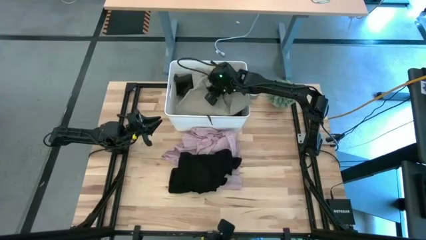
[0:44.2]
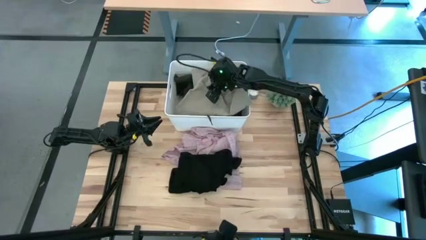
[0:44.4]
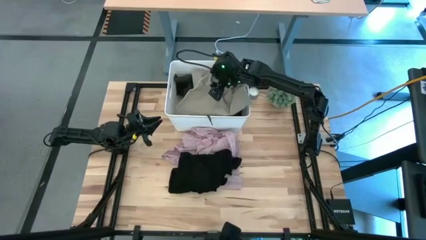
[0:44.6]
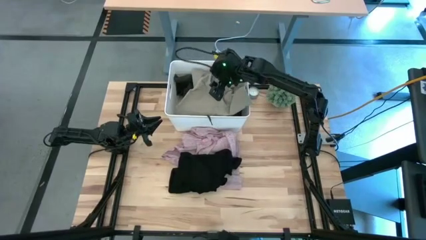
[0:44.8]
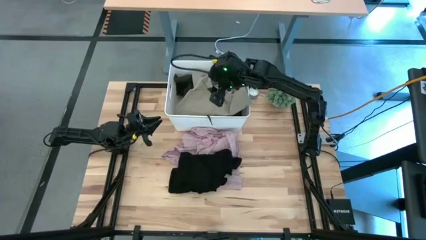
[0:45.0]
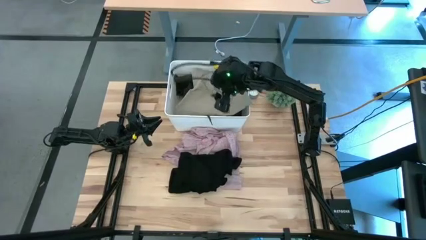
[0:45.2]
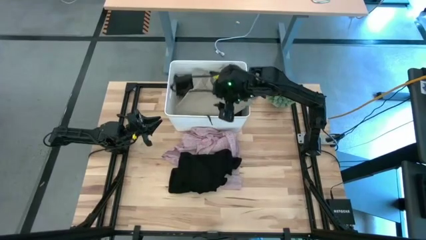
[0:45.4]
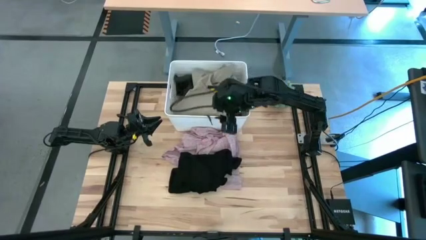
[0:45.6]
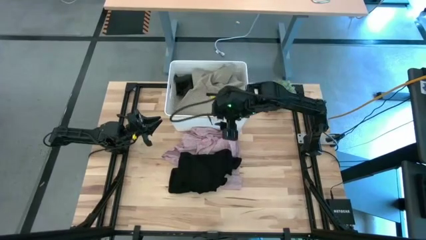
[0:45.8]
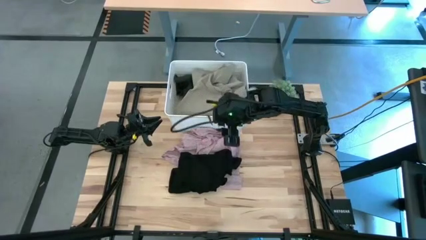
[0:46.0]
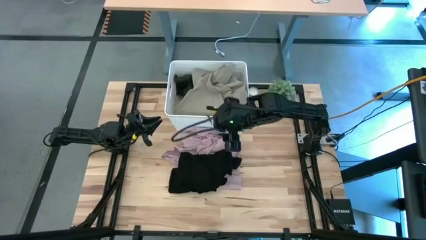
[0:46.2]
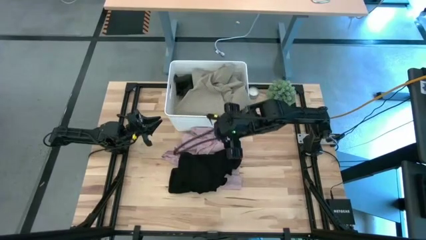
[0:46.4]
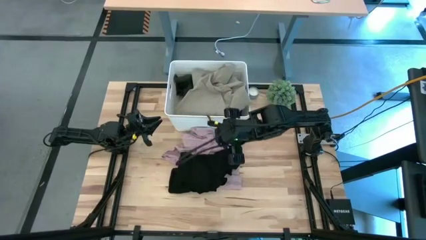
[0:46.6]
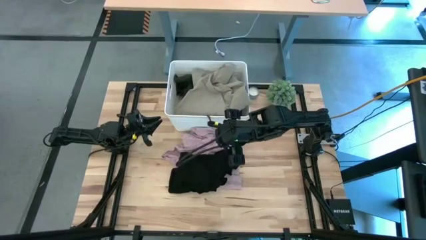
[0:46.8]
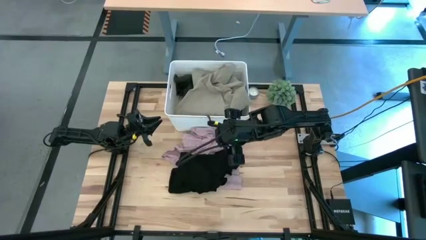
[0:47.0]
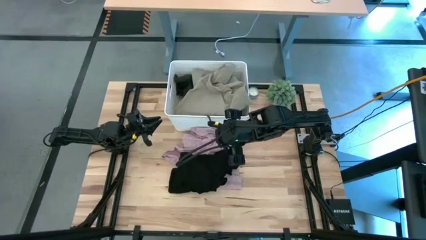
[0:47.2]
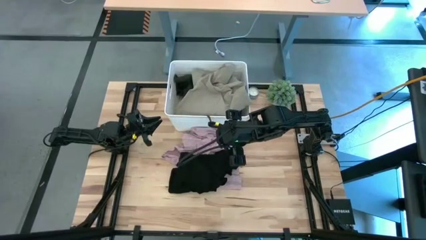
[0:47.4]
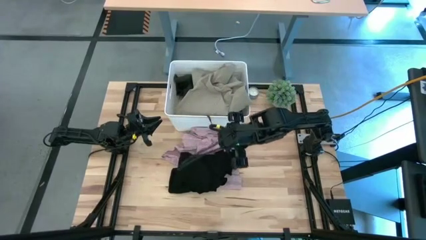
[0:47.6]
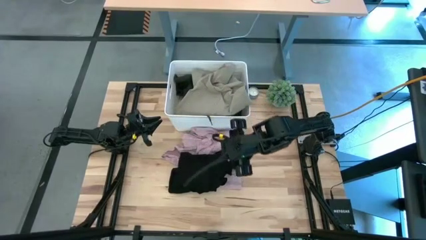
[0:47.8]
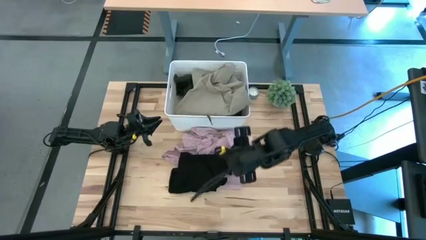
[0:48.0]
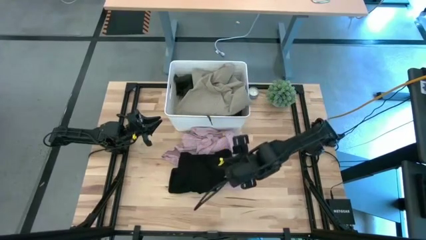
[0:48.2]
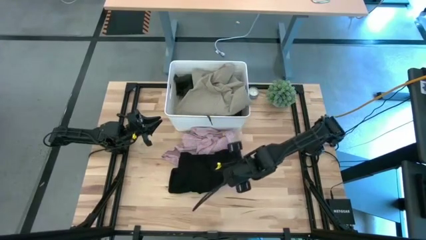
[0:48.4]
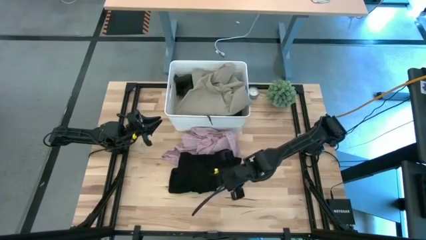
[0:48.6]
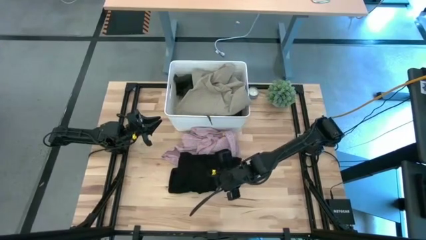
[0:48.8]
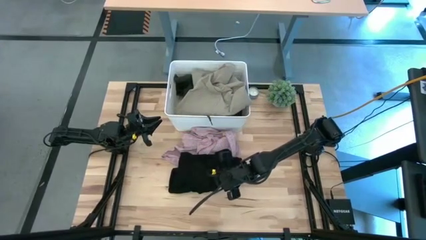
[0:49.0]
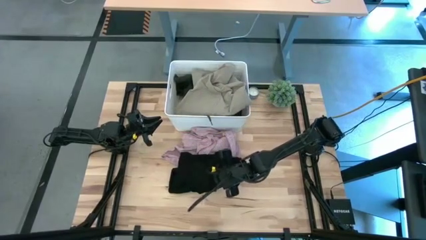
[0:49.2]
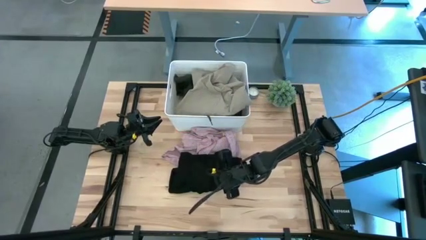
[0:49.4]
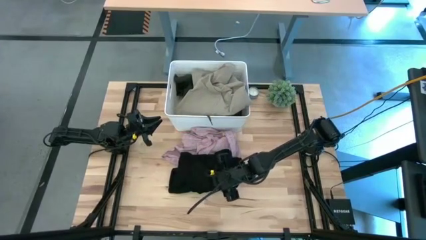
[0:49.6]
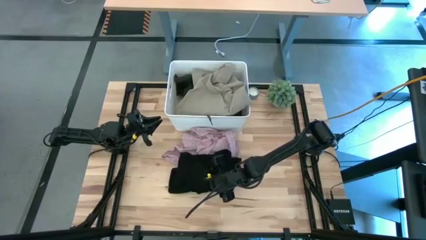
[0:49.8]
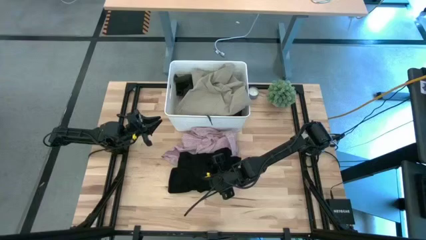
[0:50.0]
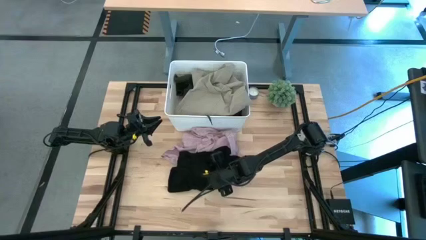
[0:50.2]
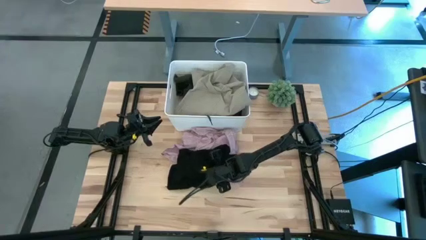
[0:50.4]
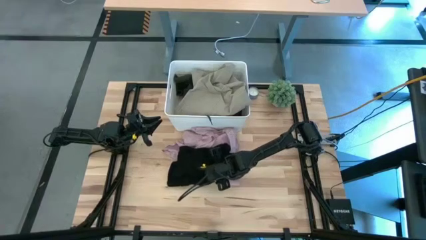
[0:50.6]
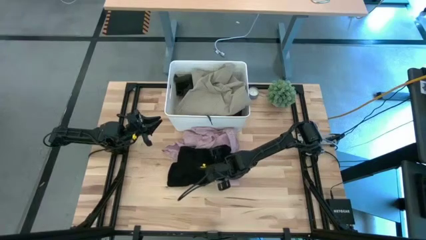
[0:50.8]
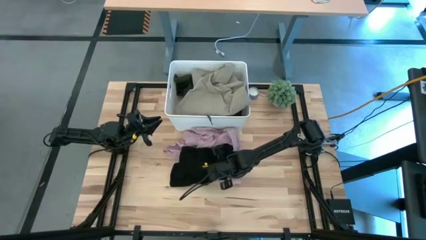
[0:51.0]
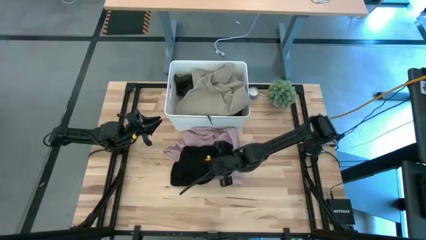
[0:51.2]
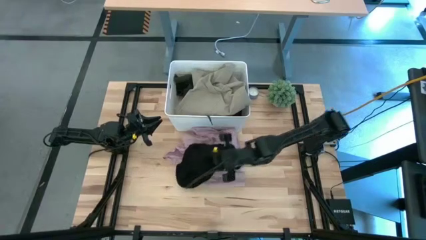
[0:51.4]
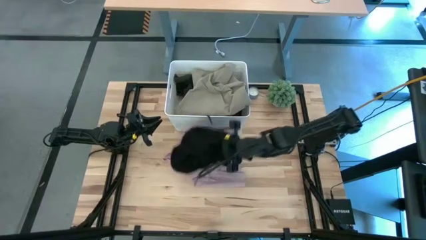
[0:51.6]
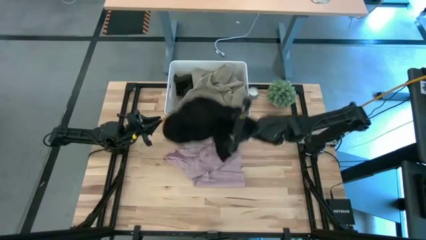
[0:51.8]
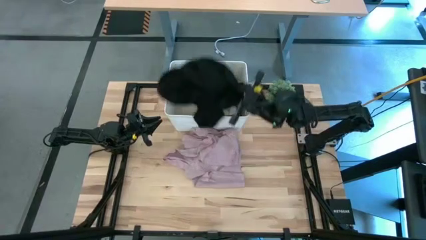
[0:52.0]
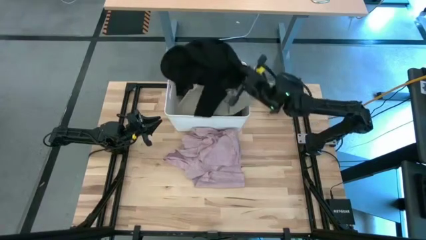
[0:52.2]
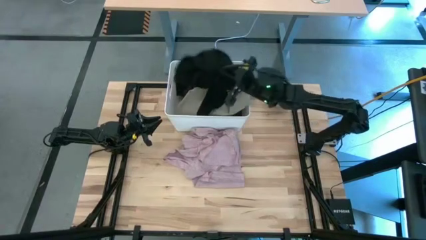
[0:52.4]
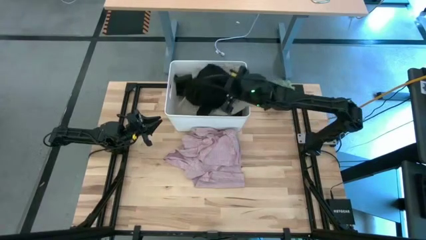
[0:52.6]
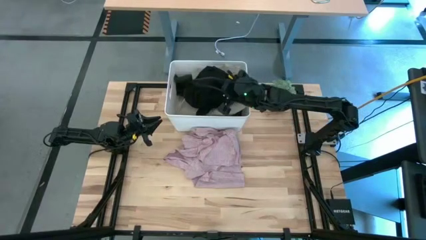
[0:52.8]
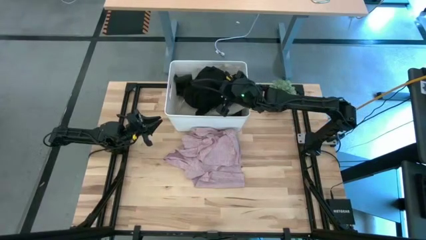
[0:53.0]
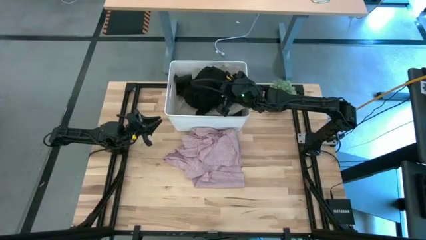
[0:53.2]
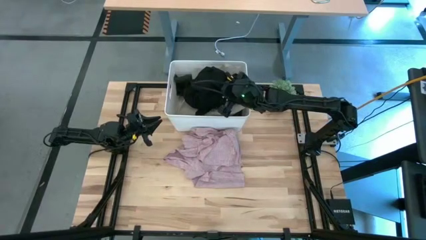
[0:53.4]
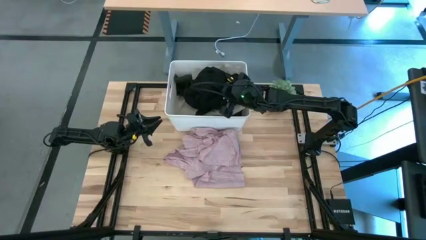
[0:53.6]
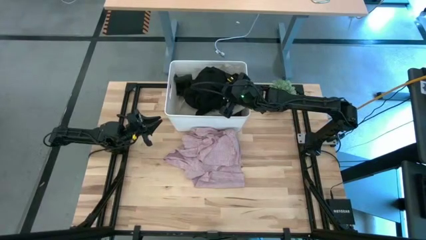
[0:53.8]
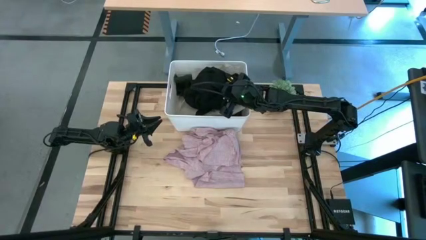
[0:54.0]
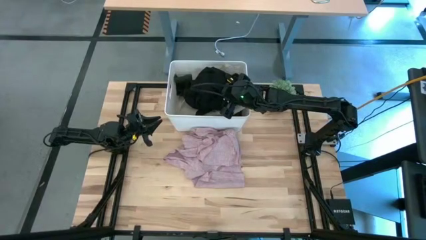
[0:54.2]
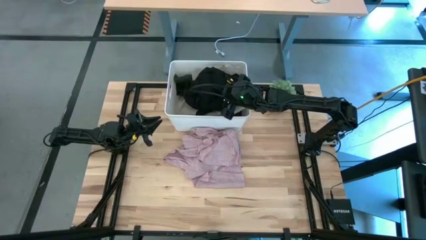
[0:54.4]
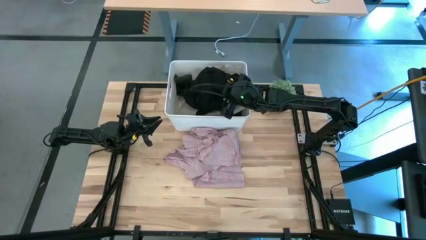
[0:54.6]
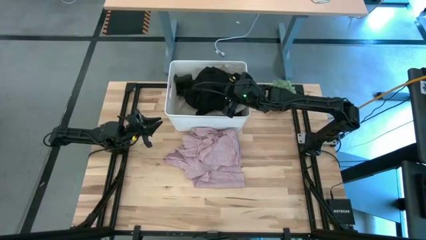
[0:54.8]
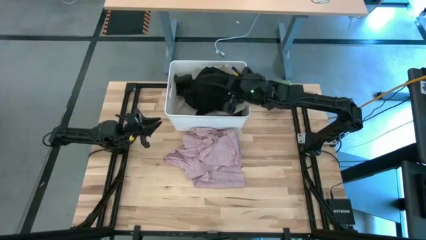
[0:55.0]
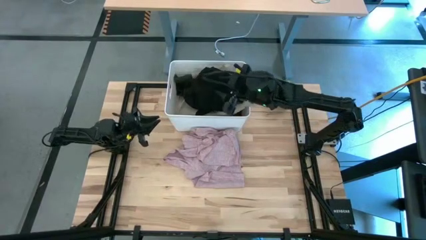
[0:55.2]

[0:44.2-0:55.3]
Task: Sort clothes
Put the black shirt into the white laundry organizer

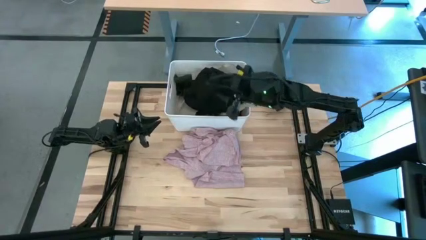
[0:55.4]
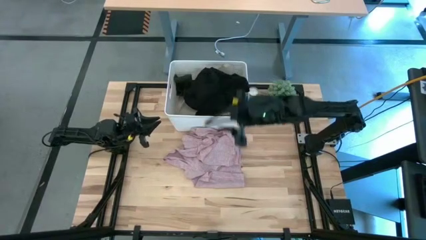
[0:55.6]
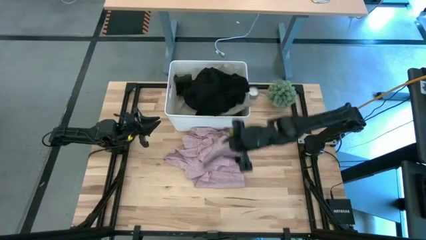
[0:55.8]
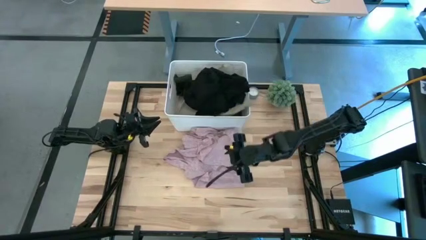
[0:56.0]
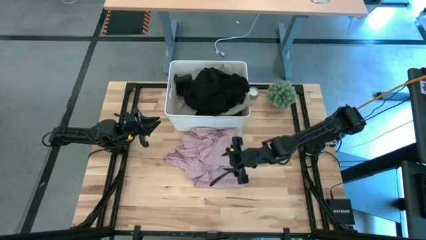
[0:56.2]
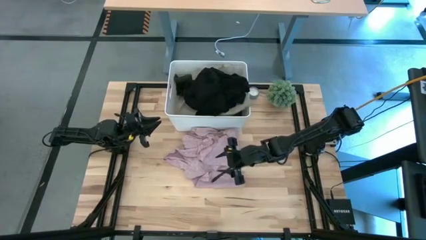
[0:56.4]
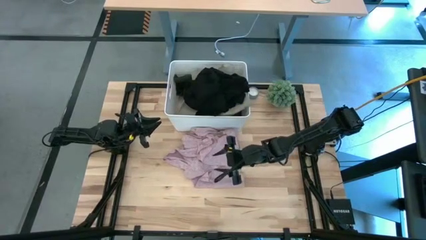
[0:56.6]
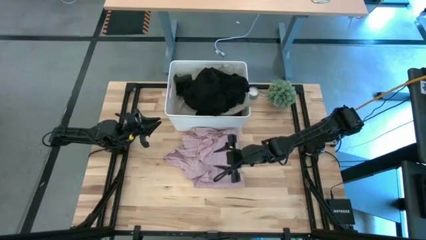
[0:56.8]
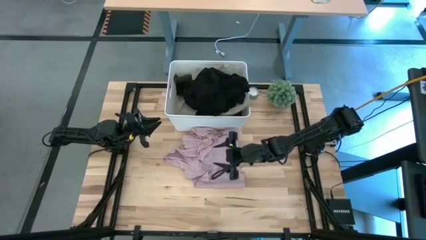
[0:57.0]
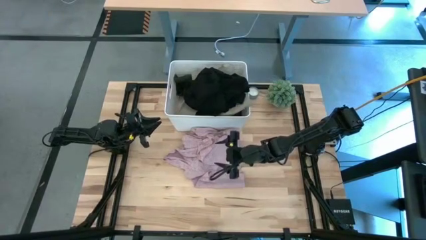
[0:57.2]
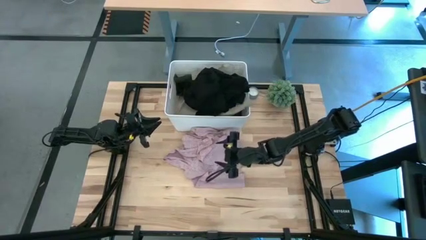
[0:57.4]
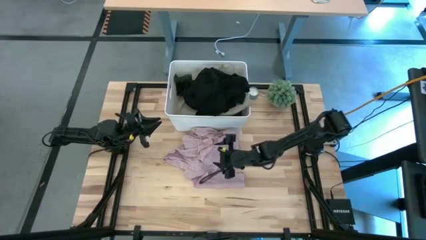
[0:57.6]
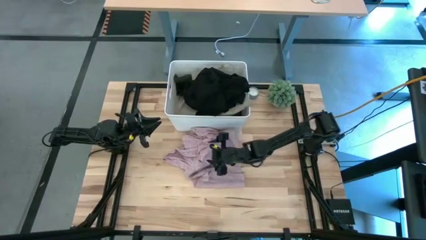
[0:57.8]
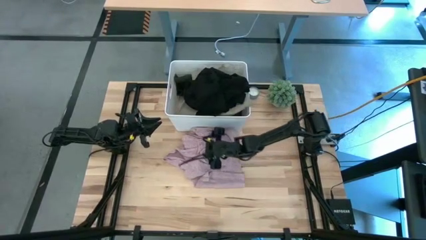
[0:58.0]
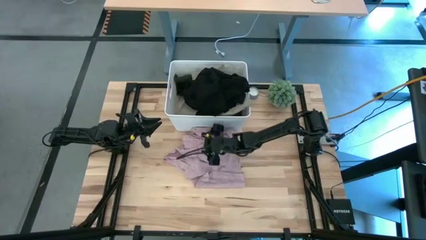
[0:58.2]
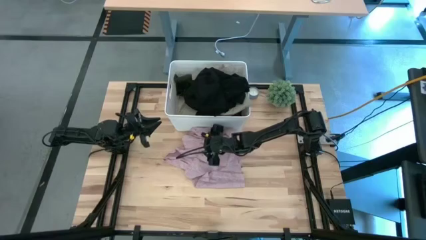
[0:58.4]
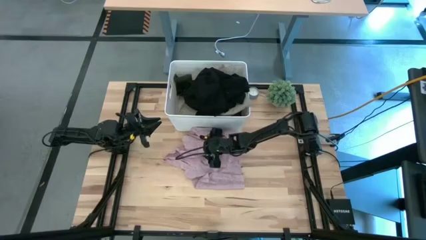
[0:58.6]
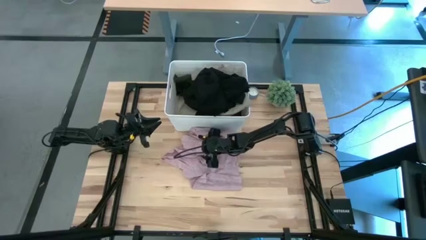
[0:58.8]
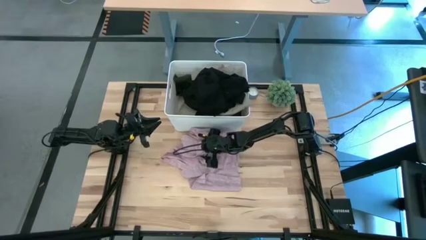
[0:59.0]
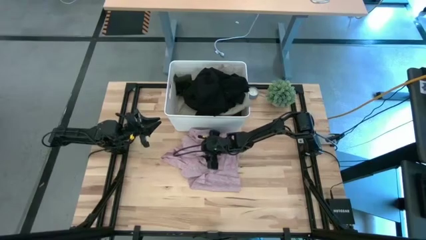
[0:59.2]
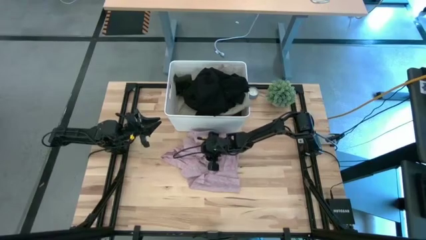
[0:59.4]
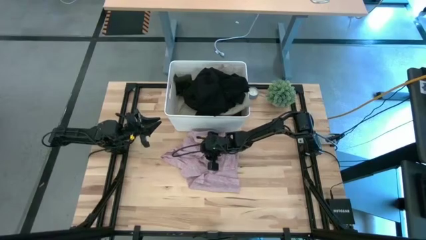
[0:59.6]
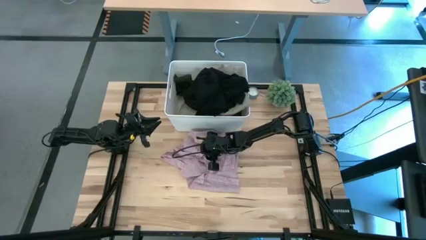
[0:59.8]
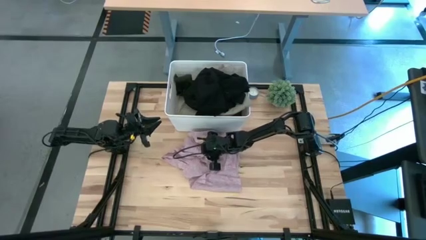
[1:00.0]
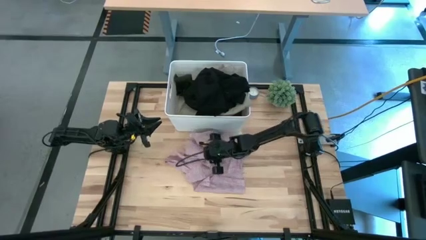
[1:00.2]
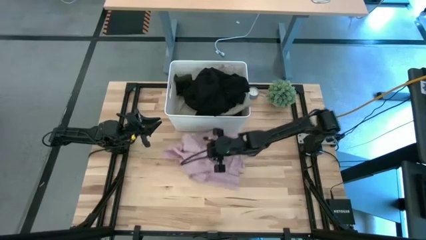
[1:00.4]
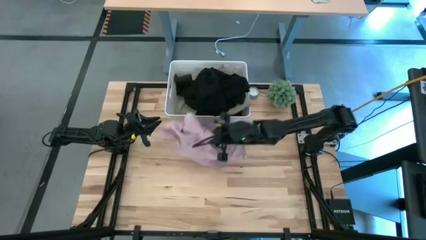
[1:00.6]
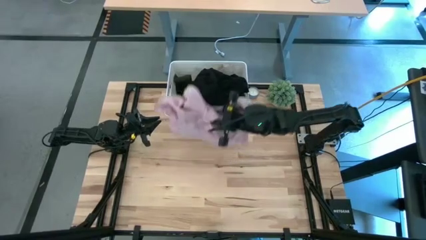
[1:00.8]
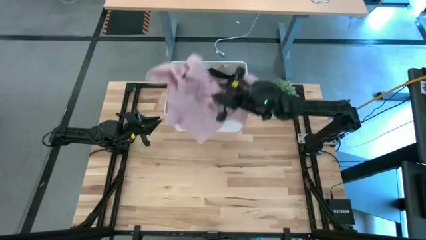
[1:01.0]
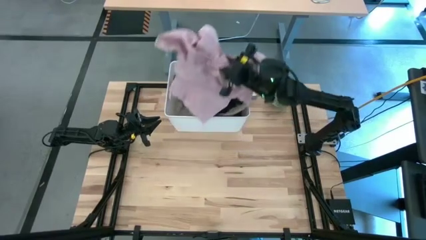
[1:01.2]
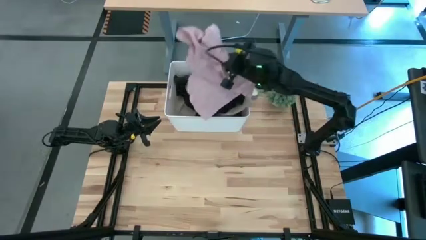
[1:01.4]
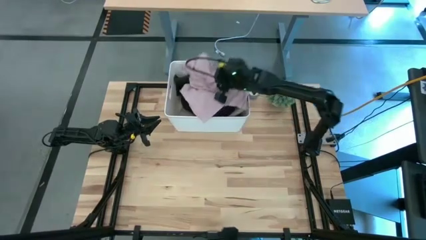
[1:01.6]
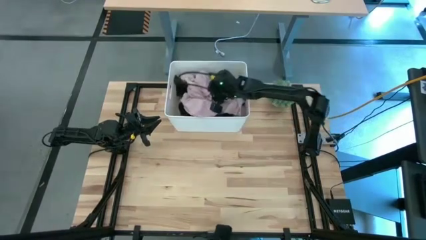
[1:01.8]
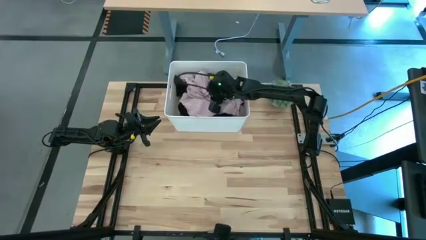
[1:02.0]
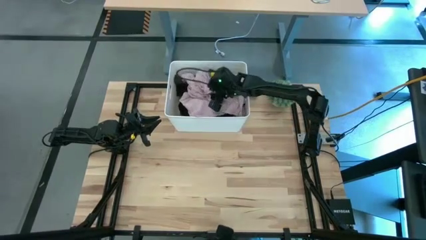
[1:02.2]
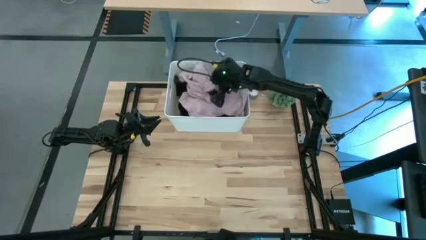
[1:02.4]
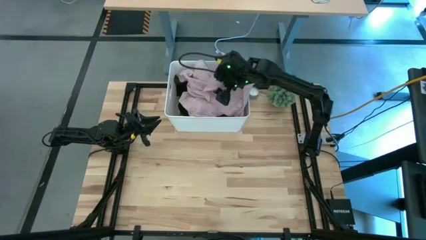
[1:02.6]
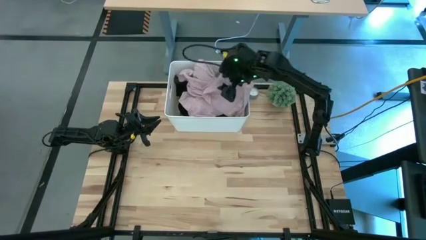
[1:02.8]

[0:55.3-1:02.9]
Put the pink blouse into the white laundry organizer
